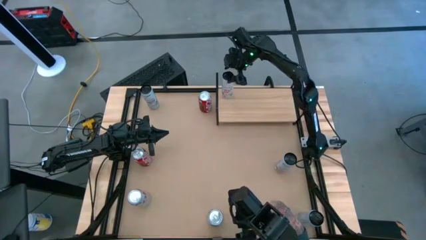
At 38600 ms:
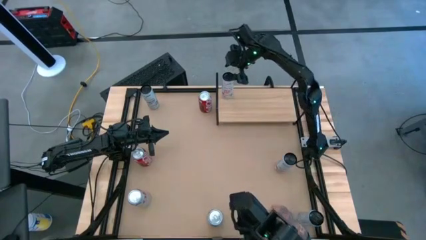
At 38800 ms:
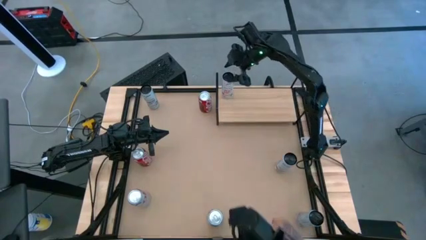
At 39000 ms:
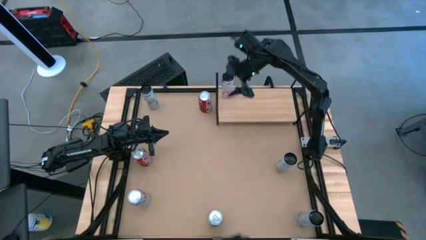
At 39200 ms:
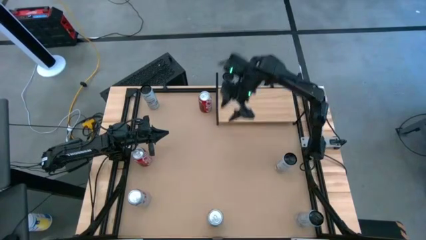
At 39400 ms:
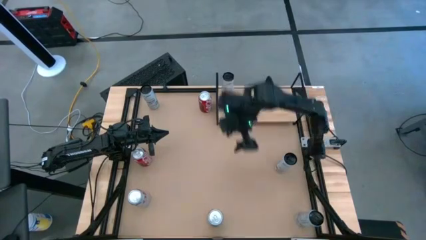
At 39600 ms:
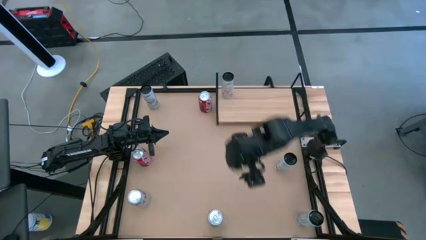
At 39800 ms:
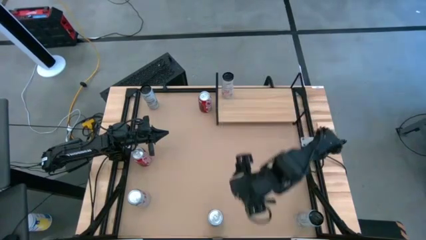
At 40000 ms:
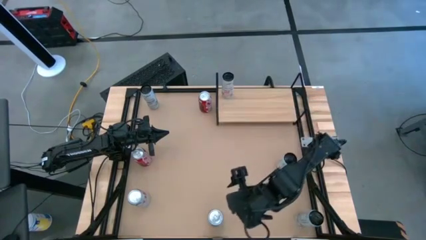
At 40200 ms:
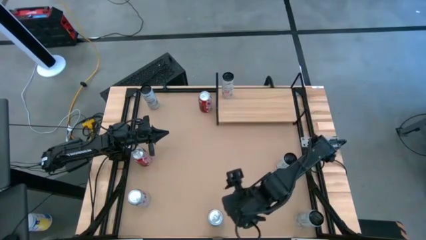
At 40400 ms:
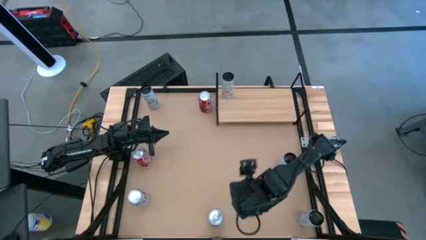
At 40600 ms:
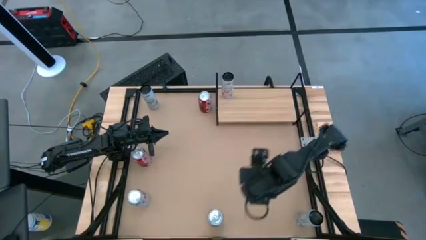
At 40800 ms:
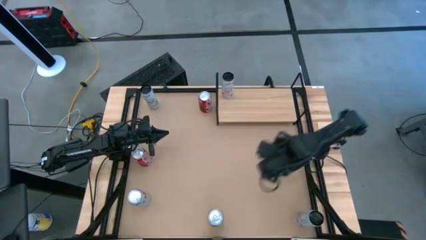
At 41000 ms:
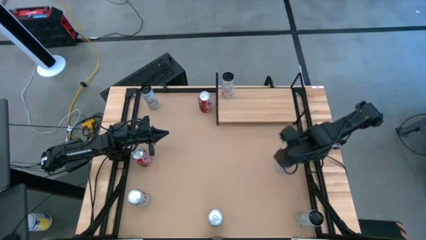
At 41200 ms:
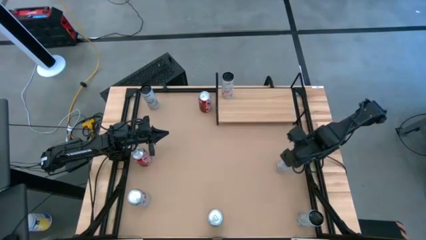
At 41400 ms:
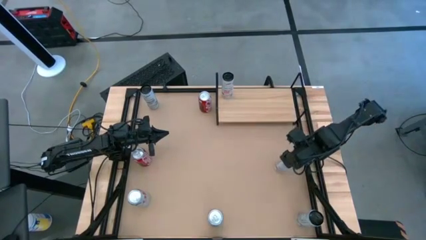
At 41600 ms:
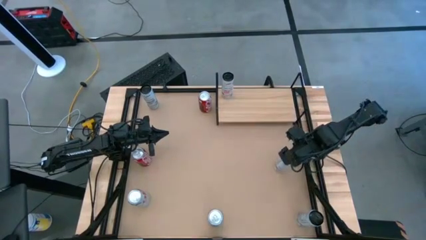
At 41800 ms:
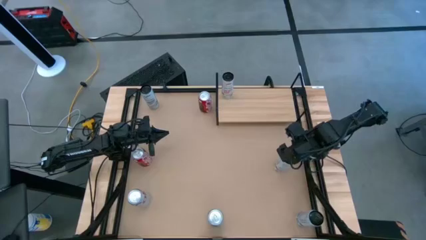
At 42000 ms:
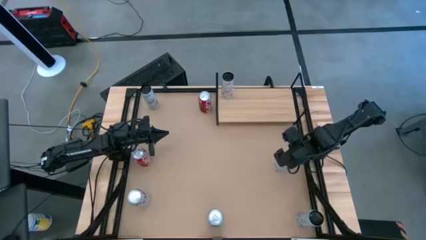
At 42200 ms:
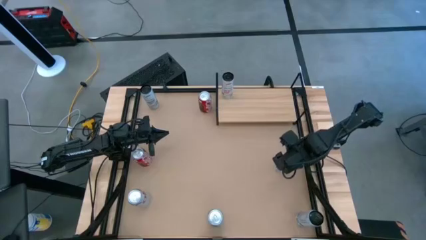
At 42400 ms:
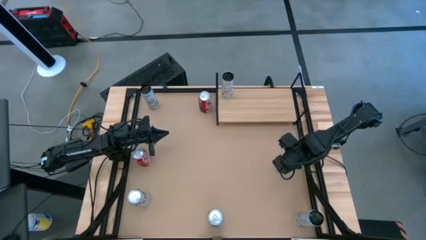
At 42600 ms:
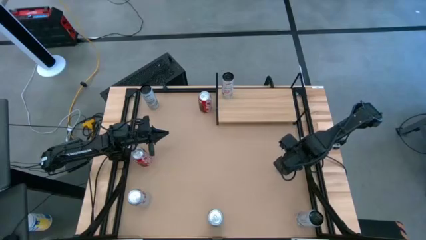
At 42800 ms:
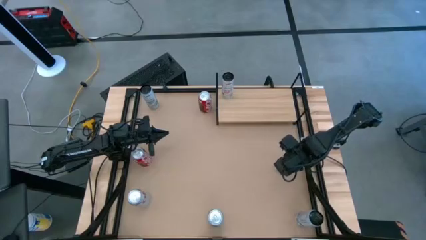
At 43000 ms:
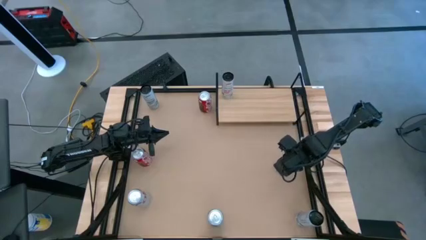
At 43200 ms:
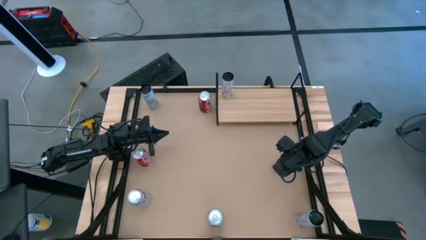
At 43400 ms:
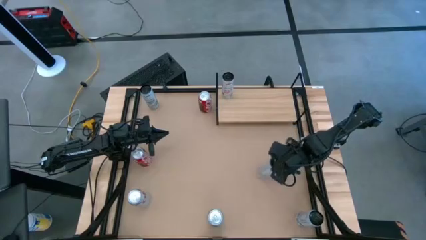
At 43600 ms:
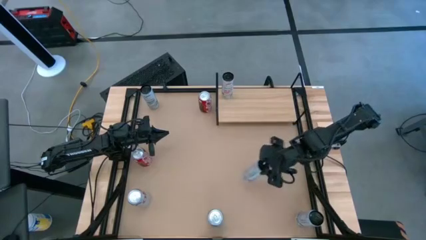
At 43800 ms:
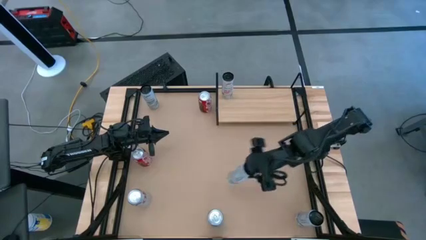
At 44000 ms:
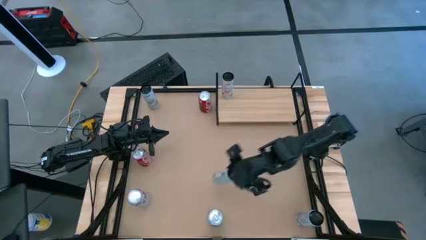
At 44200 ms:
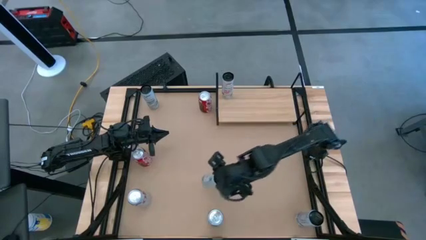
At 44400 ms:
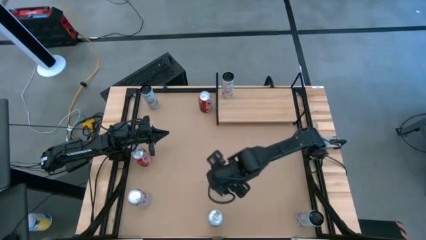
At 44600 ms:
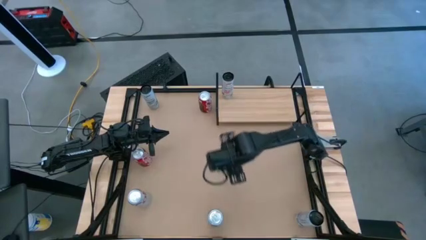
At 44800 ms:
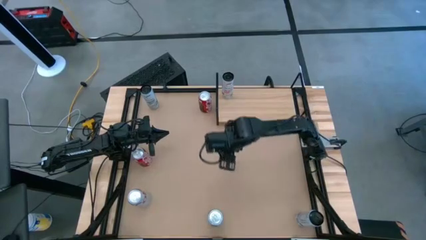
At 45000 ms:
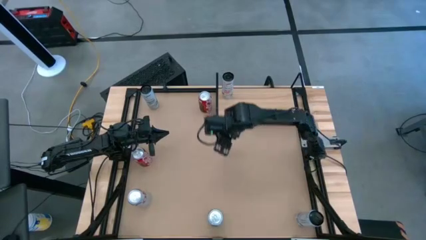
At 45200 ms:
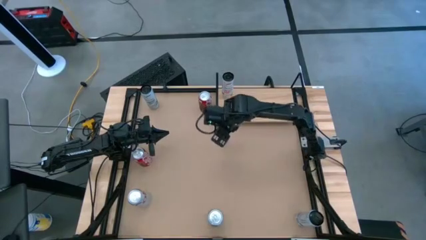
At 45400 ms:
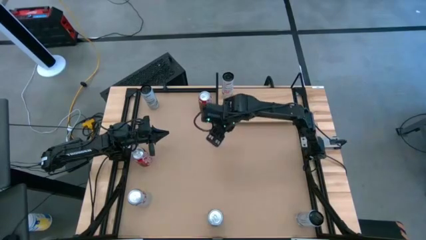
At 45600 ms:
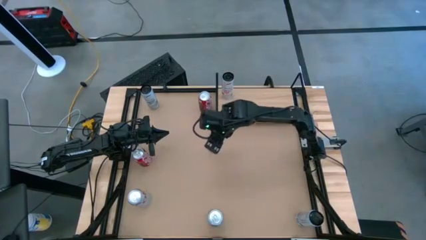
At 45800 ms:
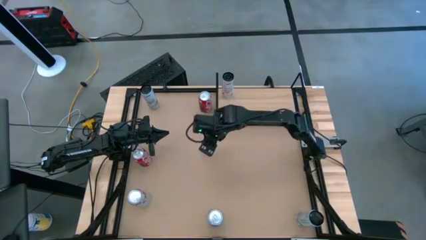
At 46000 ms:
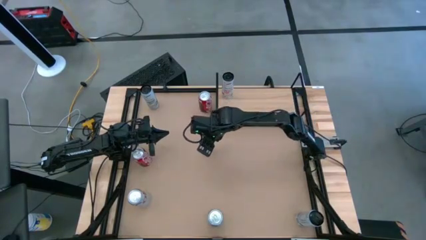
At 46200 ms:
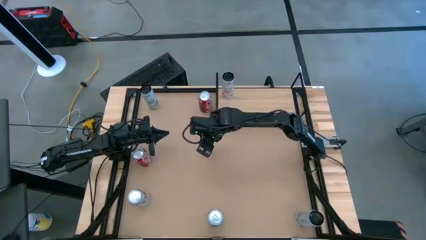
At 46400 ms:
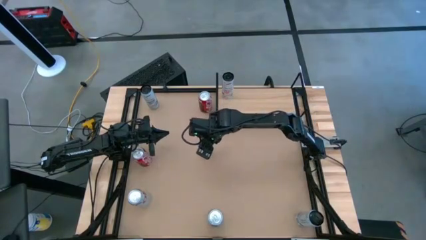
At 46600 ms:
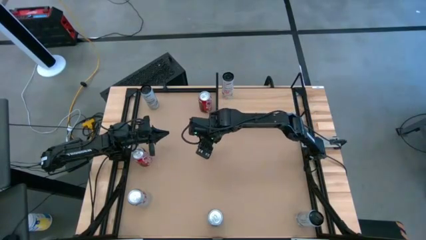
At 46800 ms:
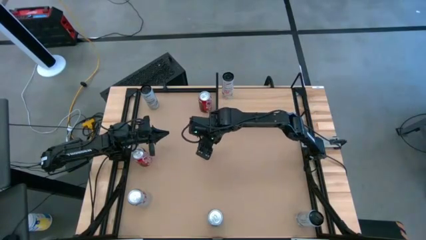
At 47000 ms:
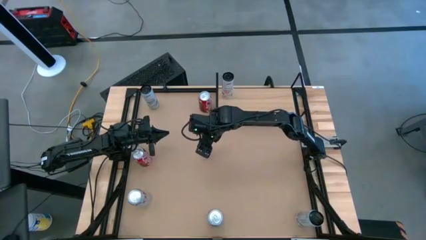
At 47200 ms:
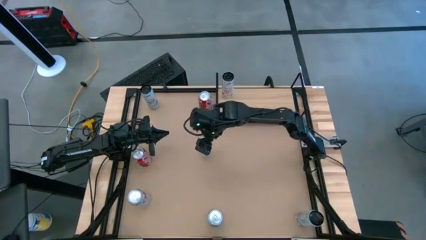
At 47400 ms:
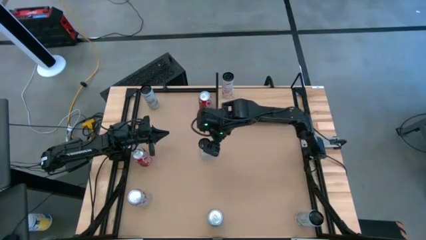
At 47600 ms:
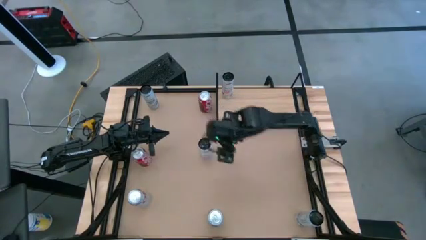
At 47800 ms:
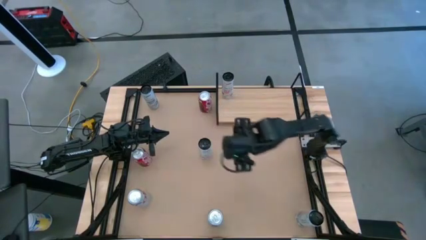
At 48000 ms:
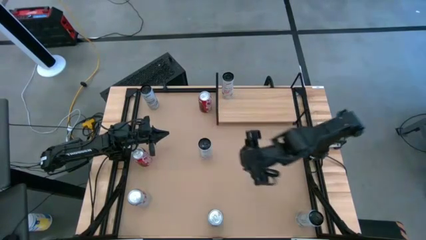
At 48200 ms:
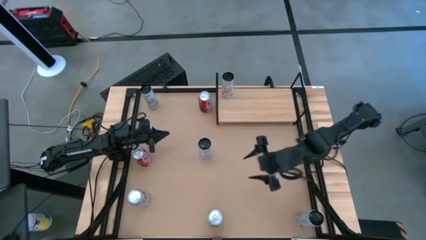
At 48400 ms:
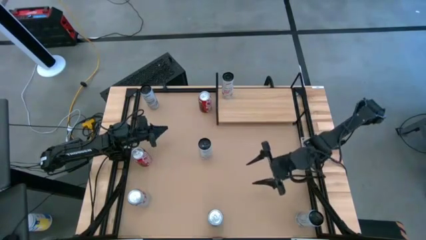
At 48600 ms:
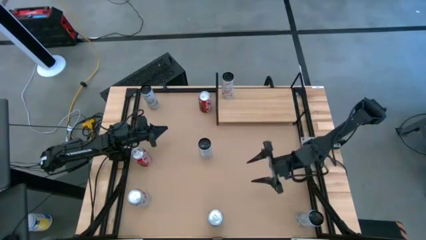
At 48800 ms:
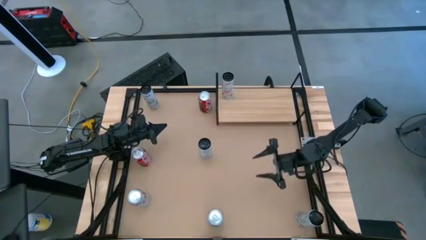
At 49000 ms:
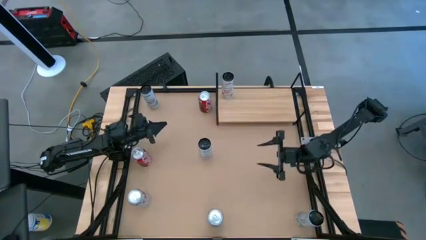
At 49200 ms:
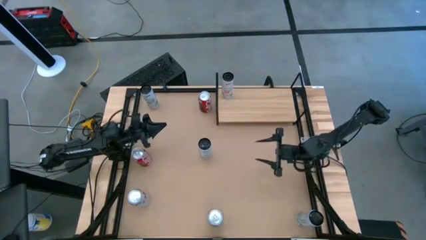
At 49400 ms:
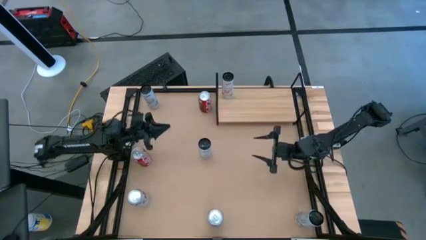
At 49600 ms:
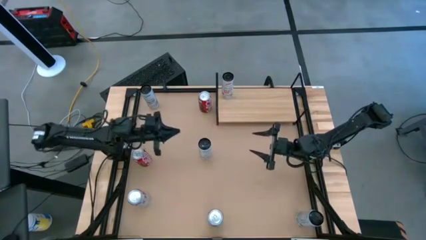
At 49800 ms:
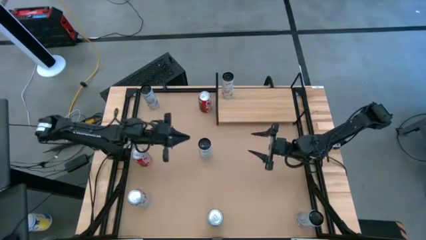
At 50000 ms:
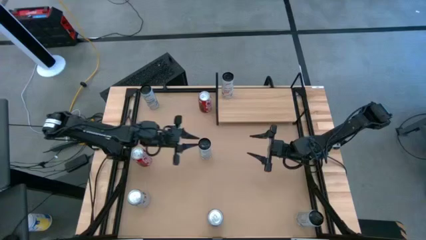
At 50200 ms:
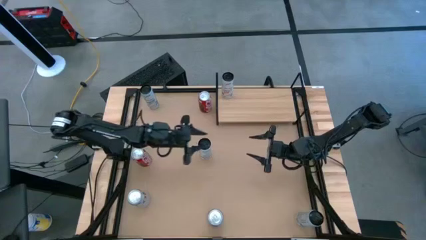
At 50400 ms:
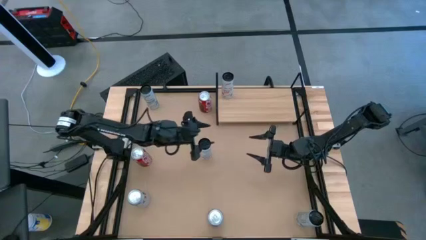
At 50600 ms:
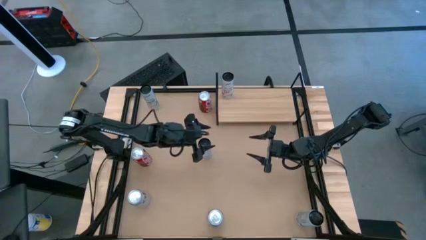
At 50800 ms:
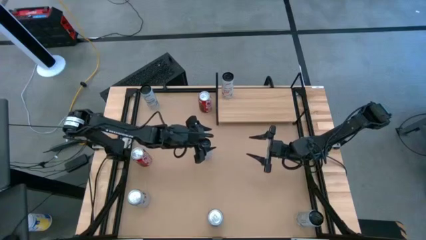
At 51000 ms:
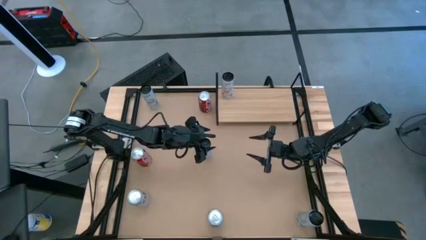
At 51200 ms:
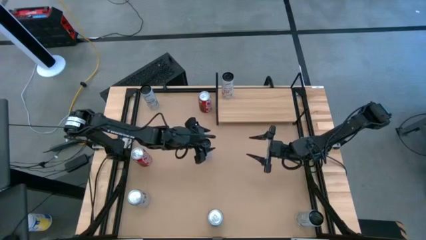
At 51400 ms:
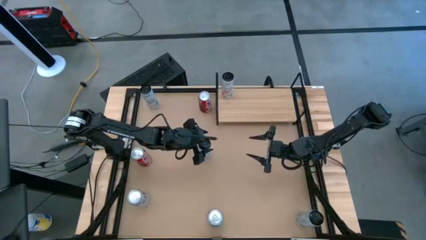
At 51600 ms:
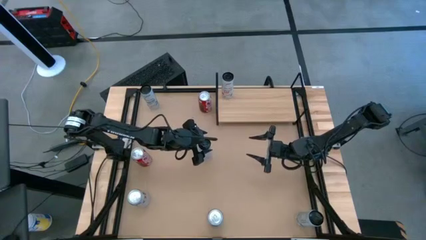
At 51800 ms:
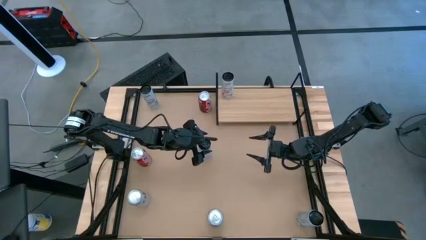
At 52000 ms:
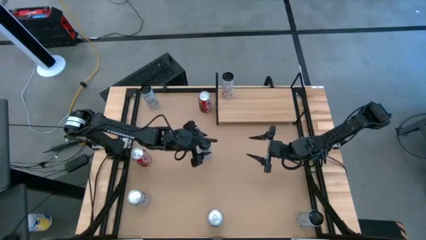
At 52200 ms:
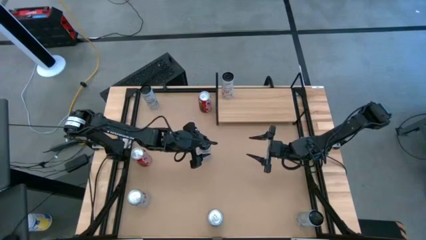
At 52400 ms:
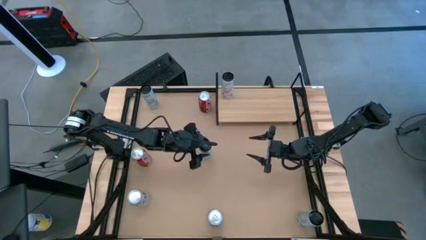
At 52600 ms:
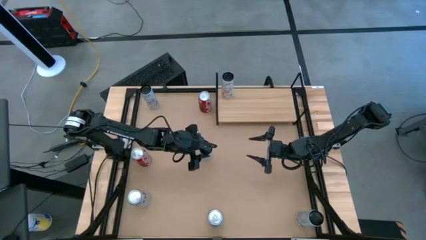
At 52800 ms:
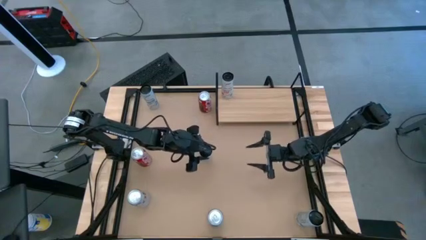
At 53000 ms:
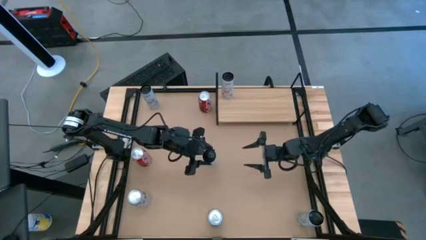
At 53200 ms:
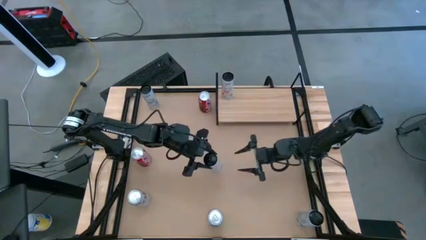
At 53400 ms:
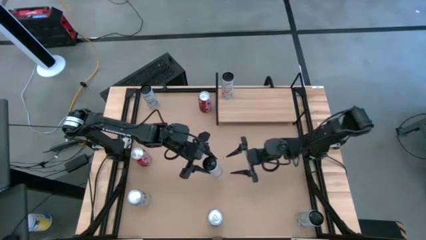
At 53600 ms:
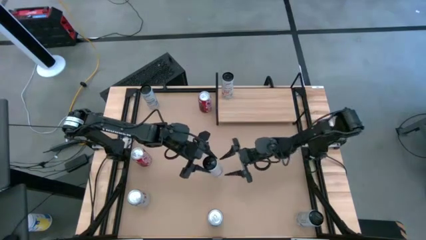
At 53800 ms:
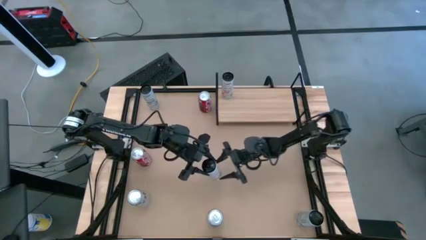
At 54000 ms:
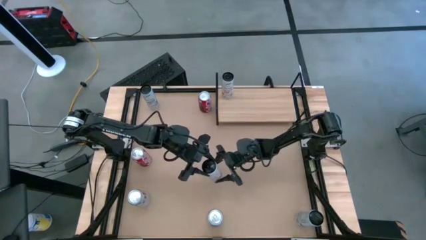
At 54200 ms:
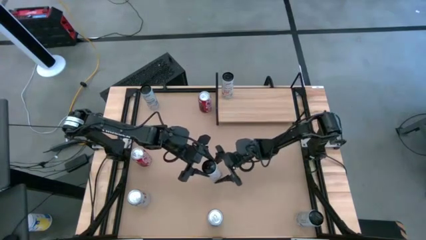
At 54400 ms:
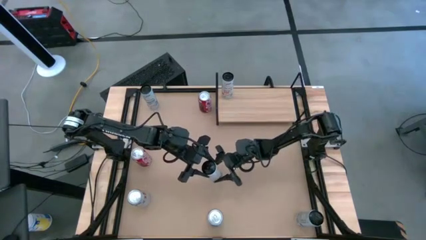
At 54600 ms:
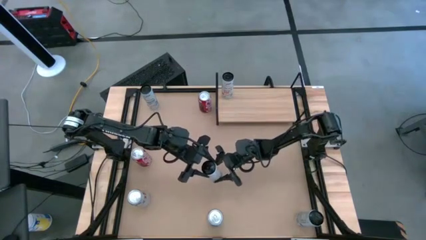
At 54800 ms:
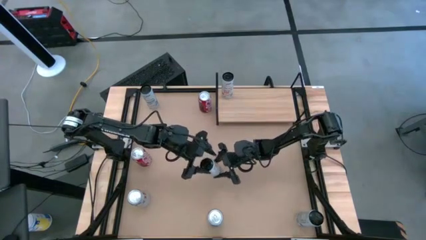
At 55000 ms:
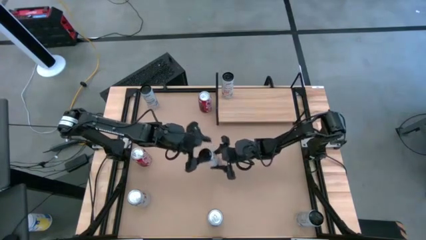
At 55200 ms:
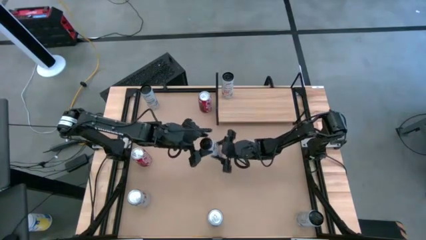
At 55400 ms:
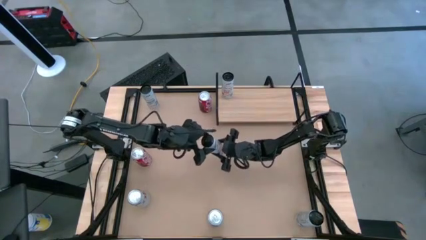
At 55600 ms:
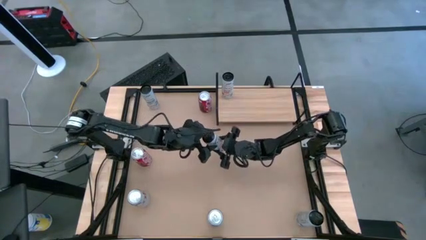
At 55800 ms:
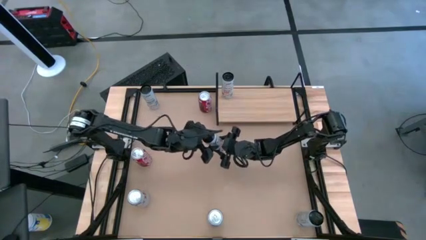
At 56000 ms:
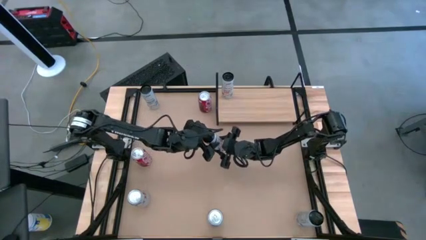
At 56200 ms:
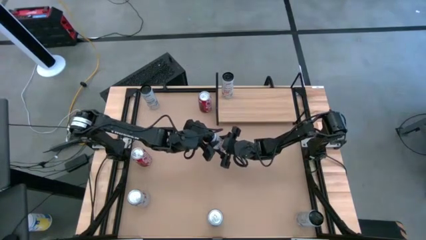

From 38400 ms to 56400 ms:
Task: Place canned beverage on shelf
Put the white-pink soda can on the shelf align with the other white-pink soda can
